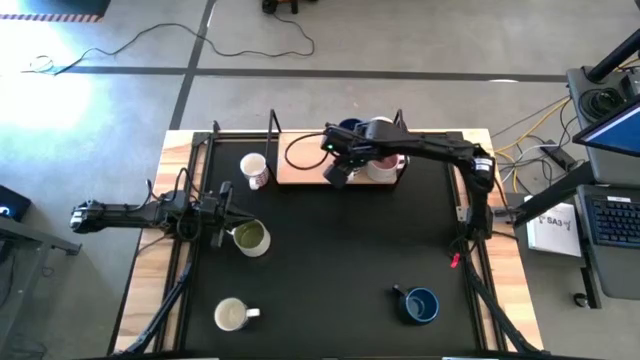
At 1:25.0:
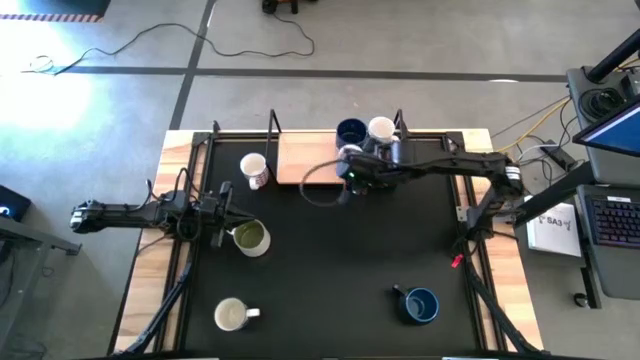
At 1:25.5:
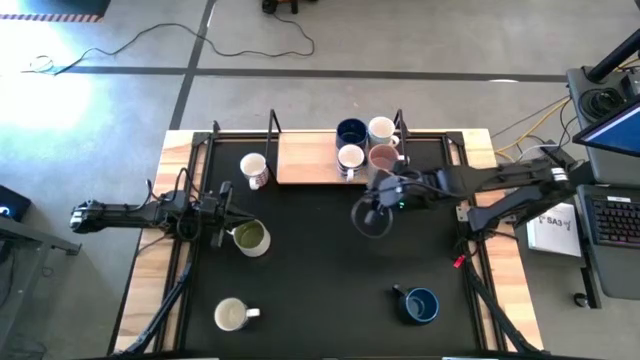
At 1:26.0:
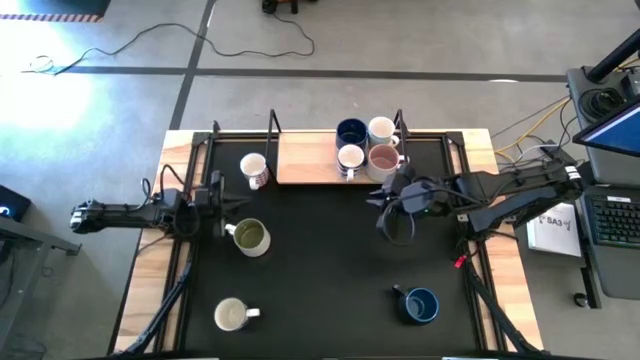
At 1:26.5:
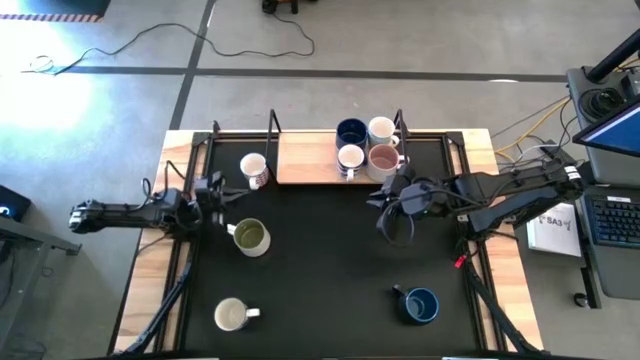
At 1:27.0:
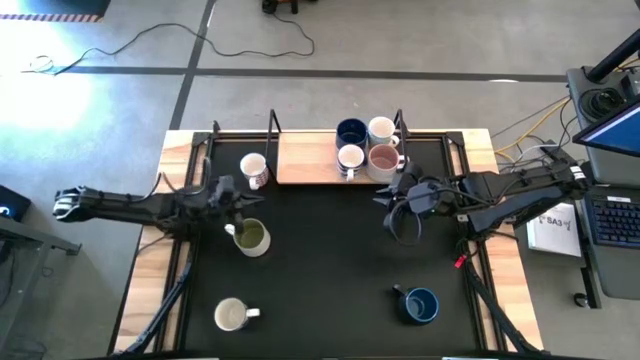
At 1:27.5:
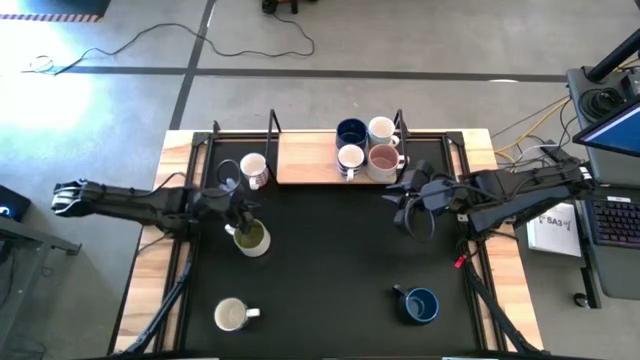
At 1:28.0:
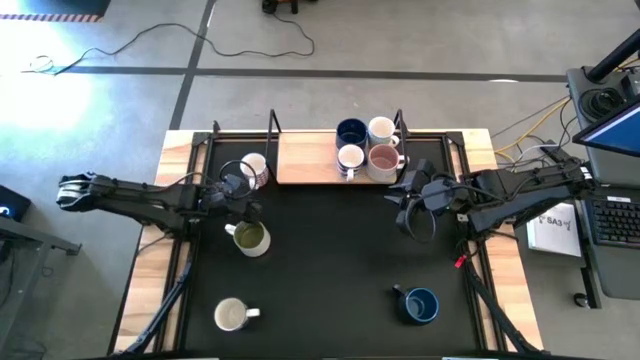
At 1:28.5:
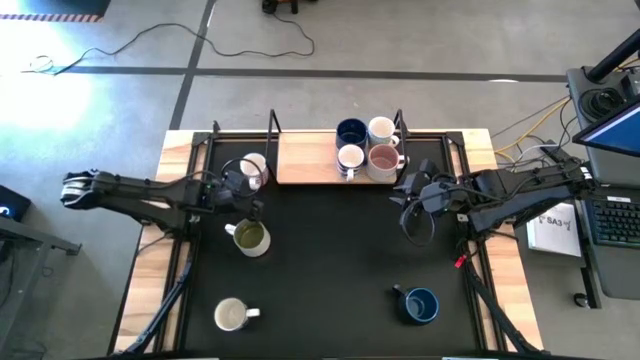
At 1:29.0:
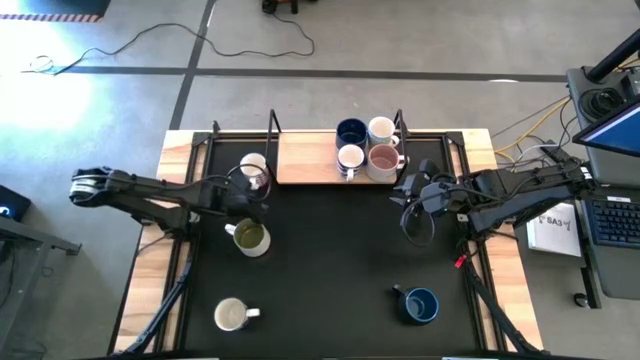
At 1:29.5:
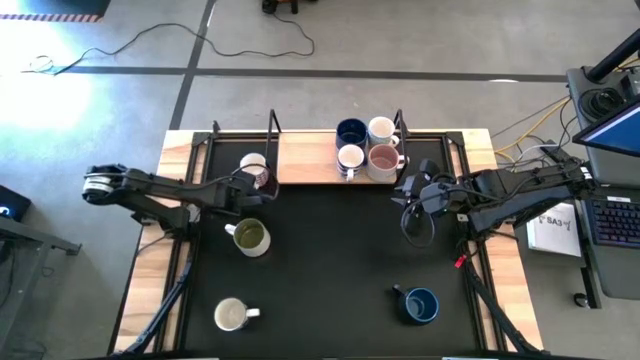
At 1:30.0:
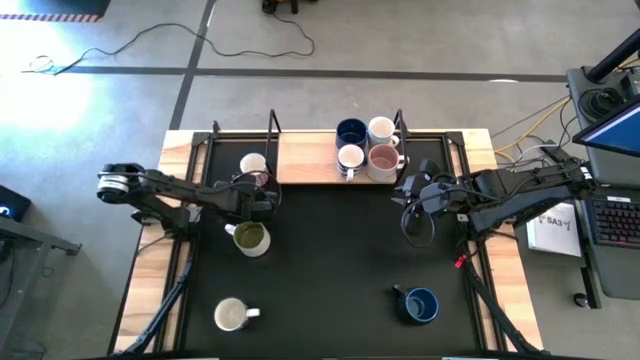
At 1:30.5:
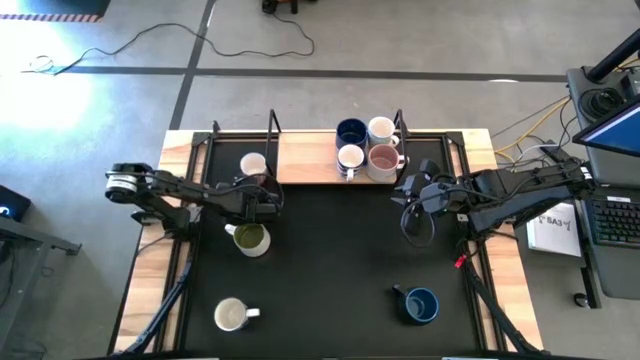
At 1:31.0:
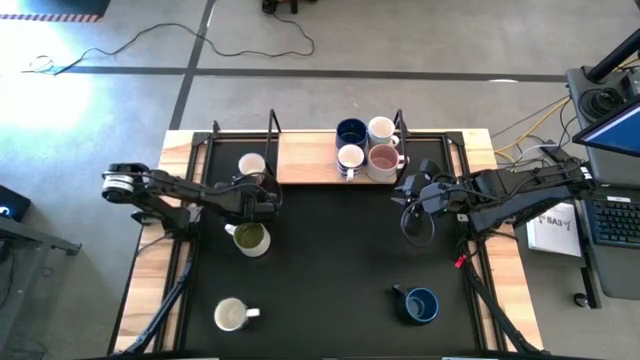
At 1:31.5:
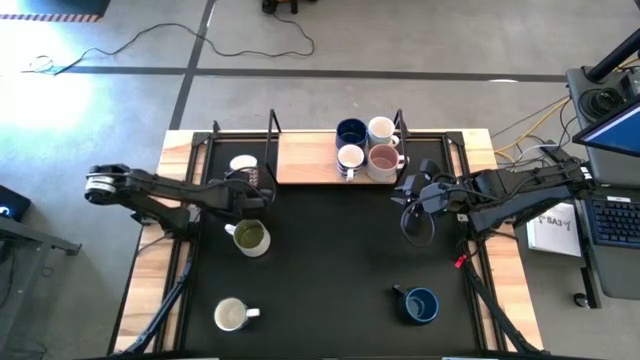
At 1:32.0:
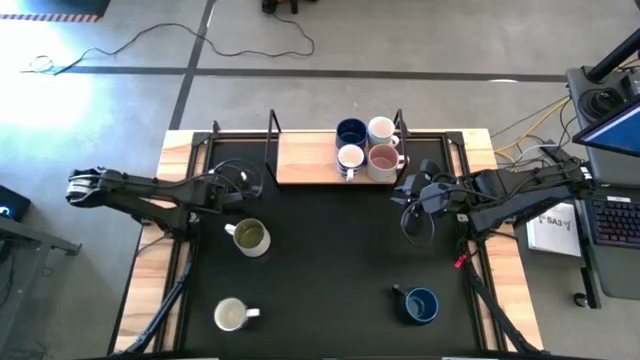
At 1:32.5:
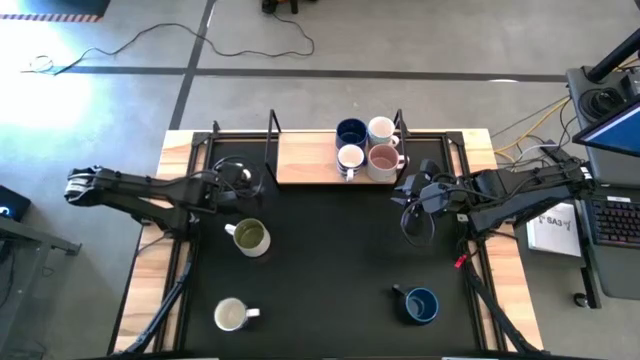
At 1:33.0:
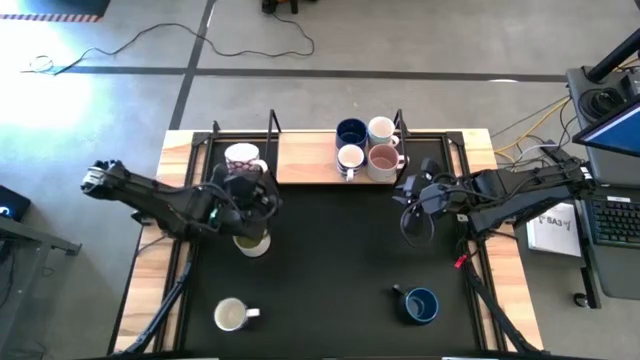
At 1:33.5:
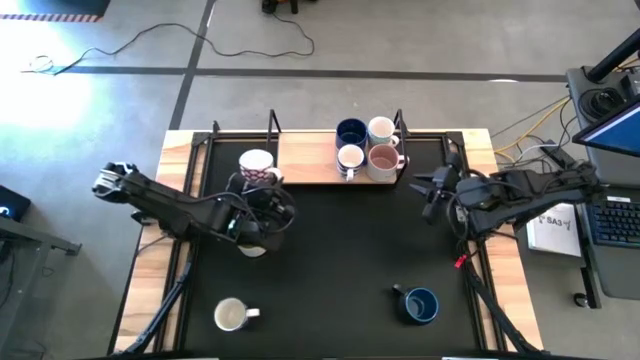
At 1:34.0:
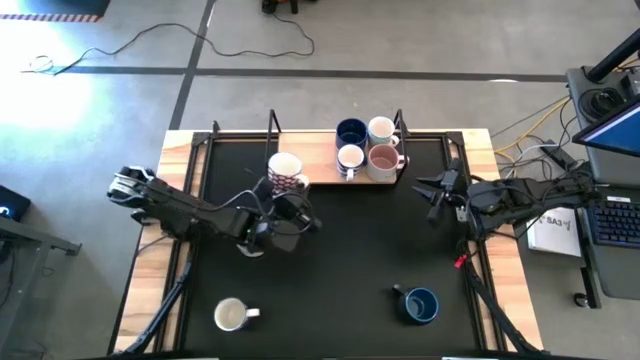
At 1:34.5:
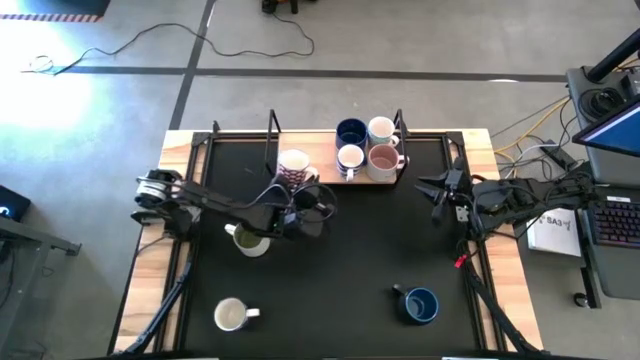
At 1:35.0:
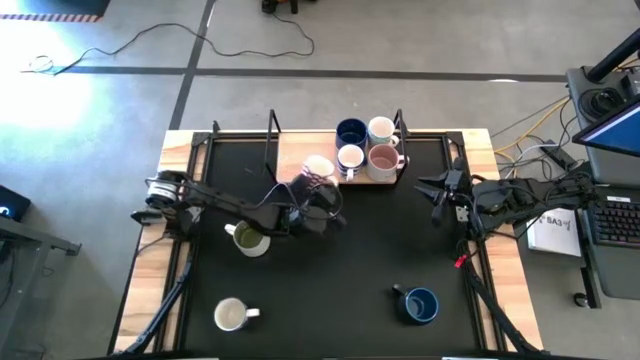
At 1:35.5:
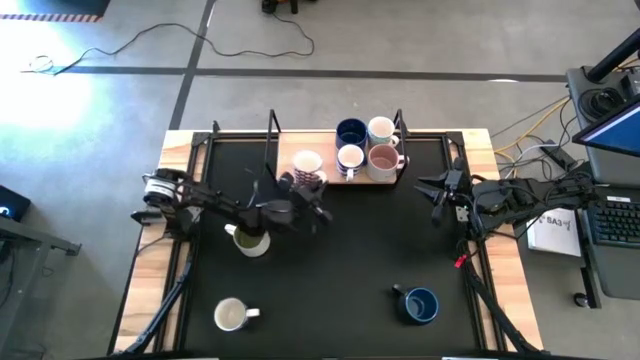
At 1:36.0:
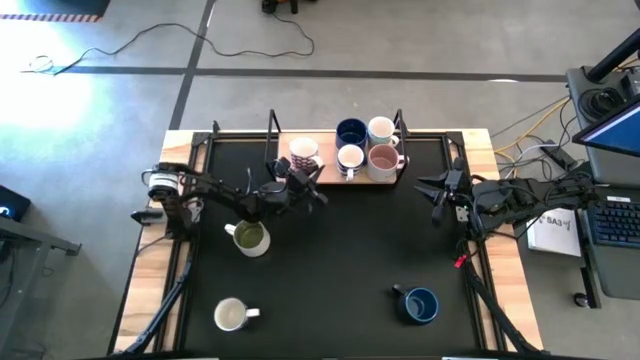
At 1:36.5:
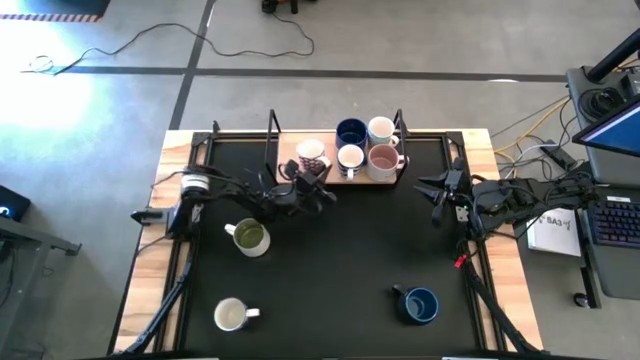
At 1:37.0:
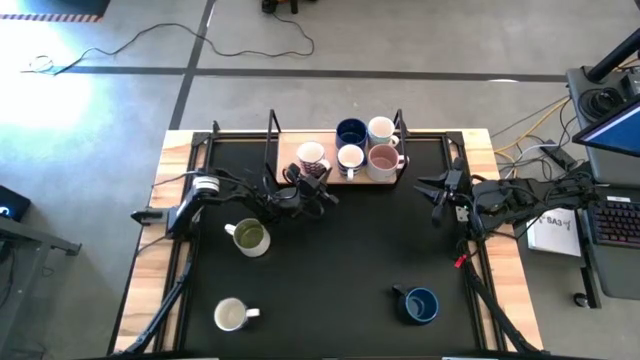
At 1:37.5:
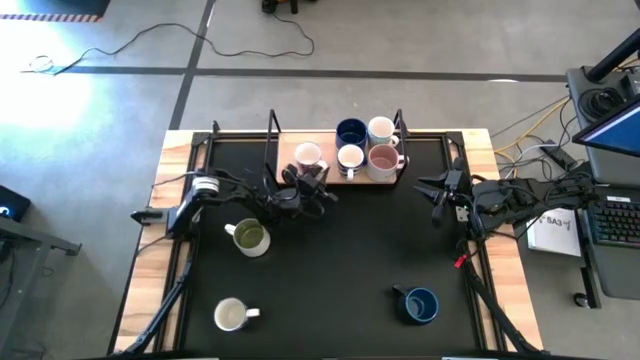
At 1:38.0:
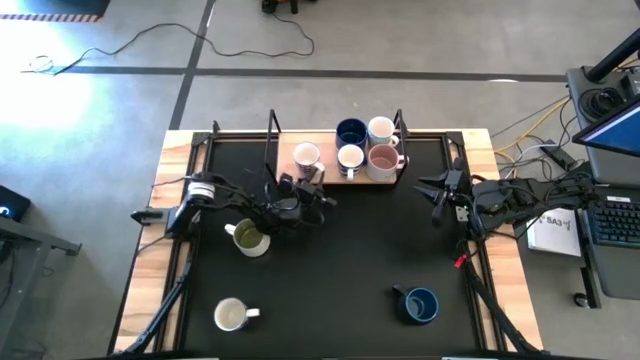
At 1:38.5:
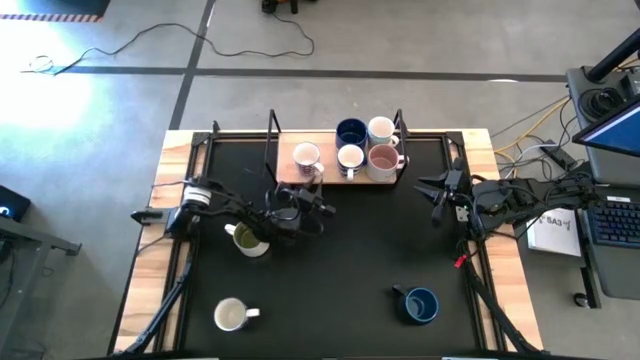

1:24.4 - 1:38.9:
Task: Place coffee mugs
Put the red mug on the shelf

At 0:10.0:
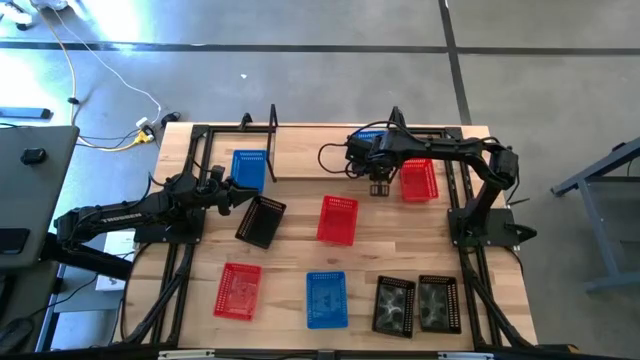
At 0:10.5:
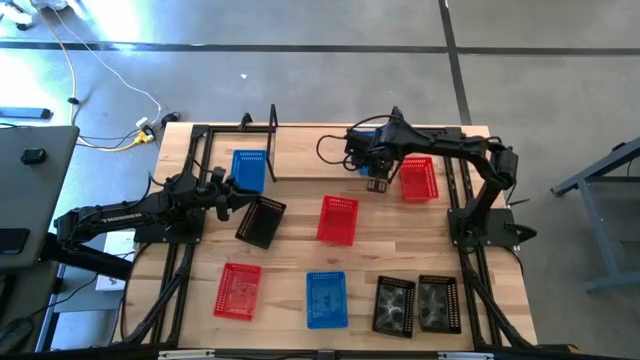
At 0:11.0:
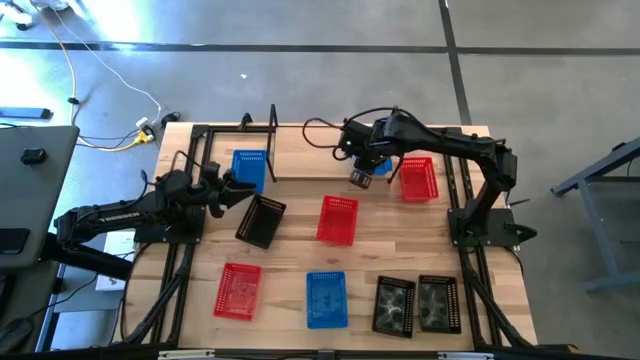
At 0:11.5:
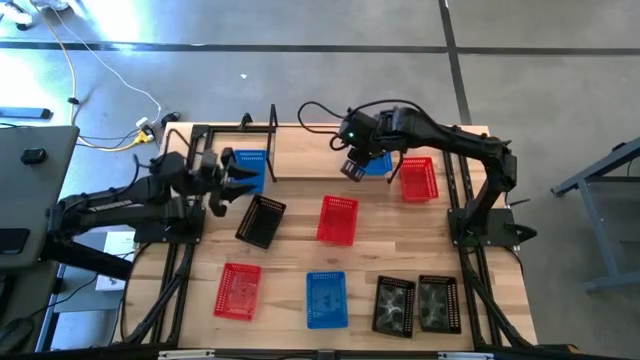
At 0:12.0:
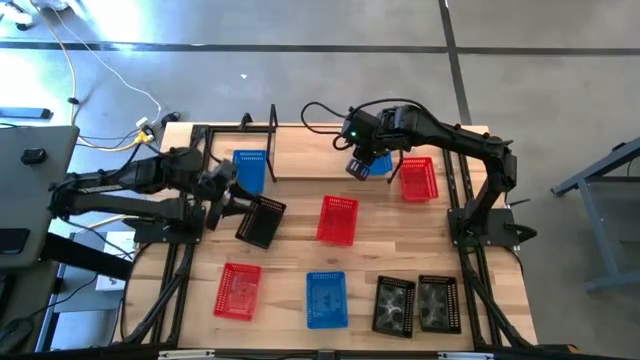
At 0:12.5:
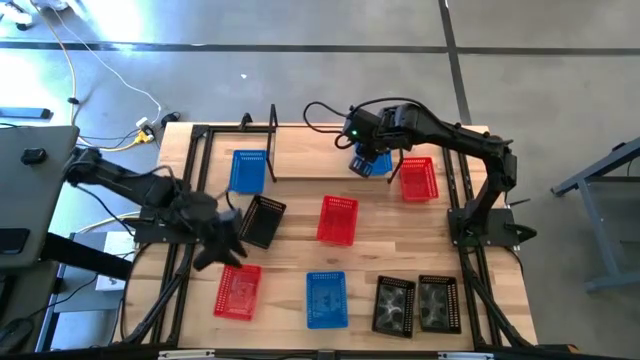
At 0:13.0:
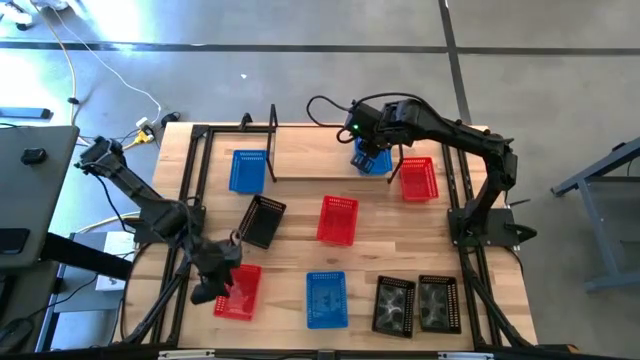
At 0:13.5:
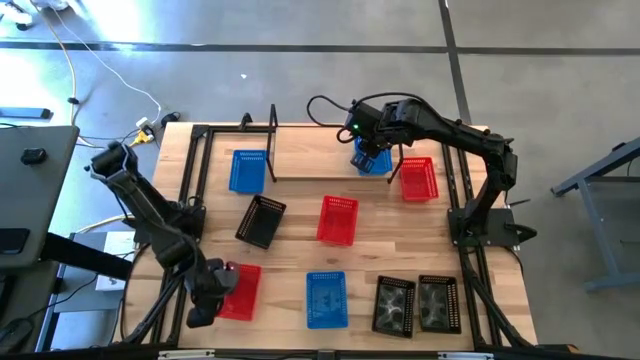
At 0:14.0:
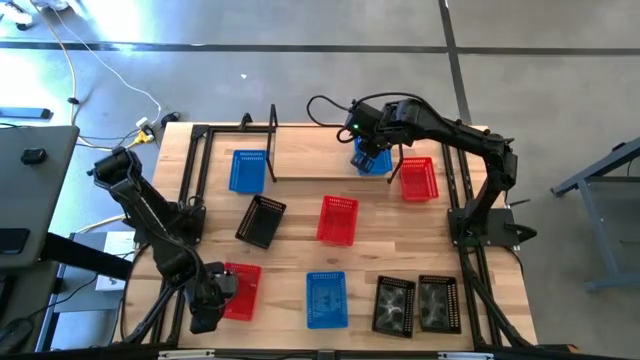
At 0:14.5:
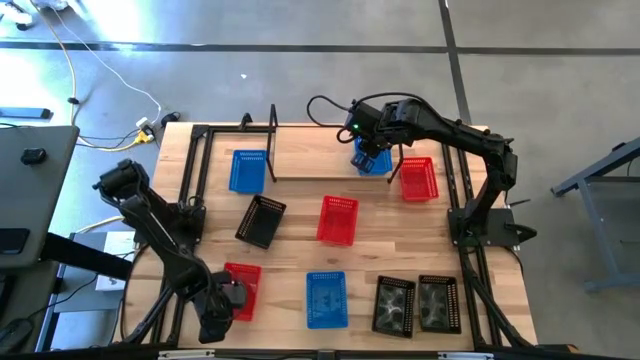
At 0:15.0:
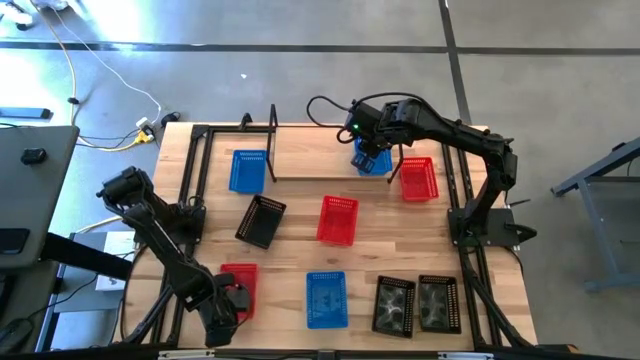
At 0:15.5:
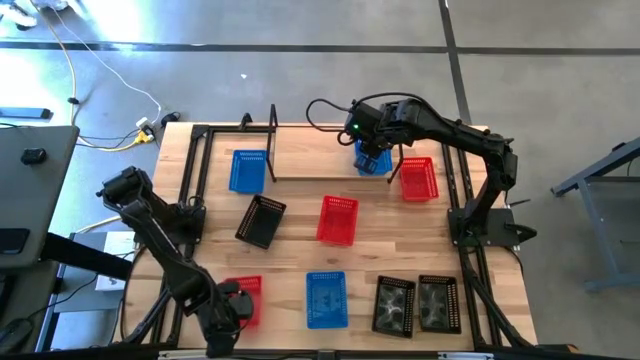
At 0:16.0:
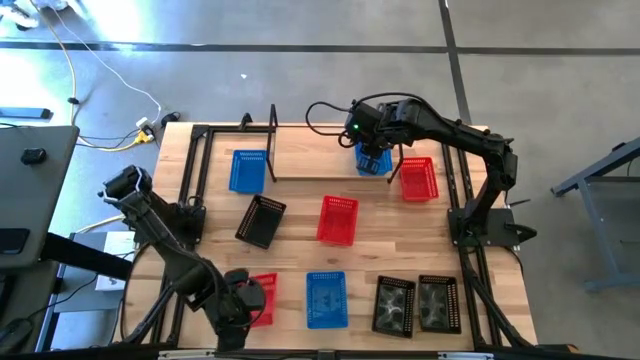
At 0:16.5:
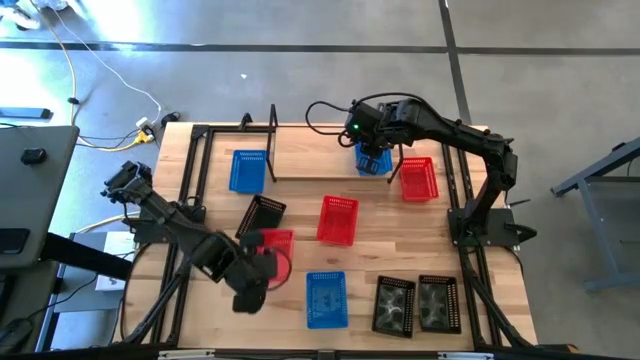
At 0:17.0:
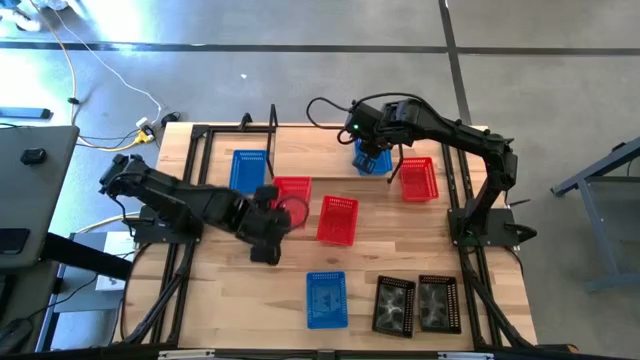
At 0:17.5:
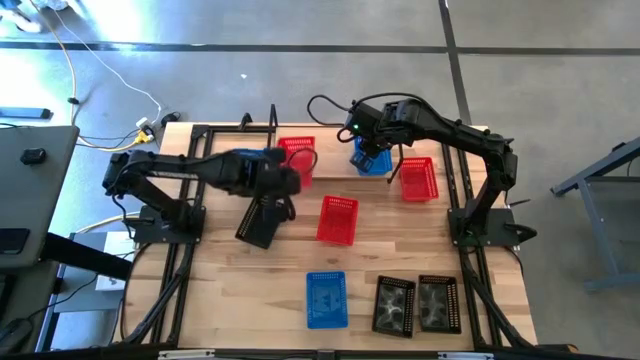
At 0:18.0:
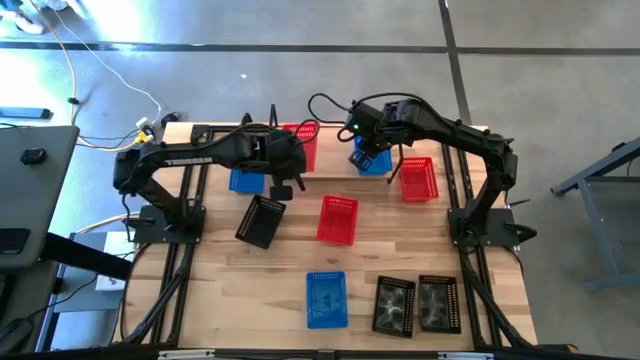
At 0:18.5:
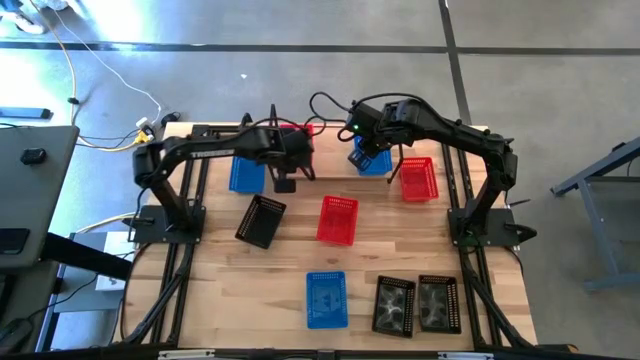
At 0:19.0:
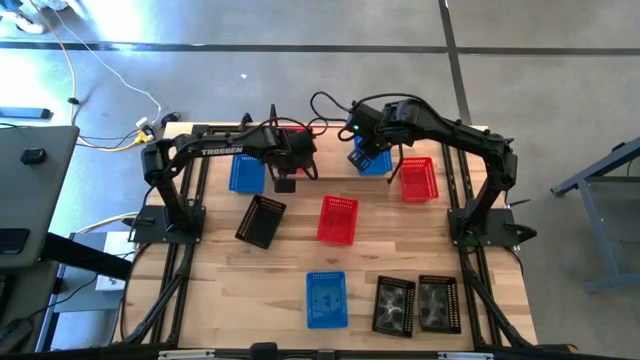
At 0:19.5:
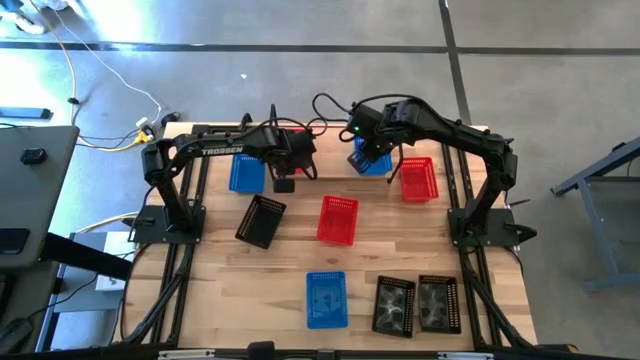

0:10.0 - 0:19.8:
Task: Stack baskets on shelf by color
Put the bottom left red basket on the shelf
